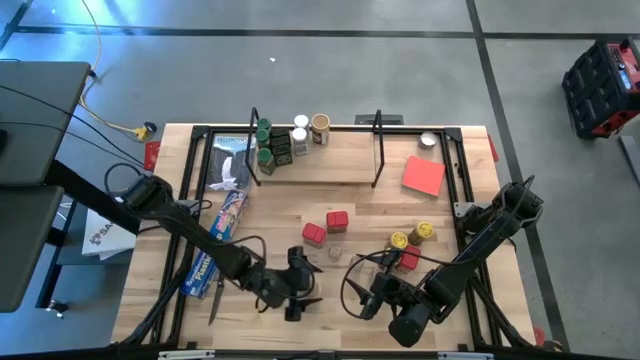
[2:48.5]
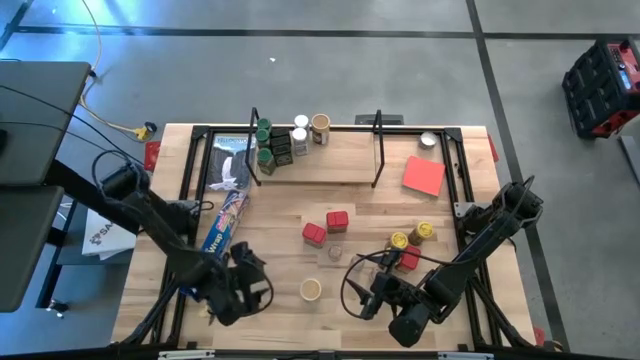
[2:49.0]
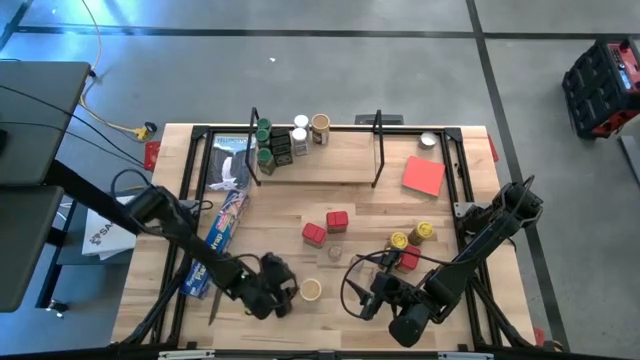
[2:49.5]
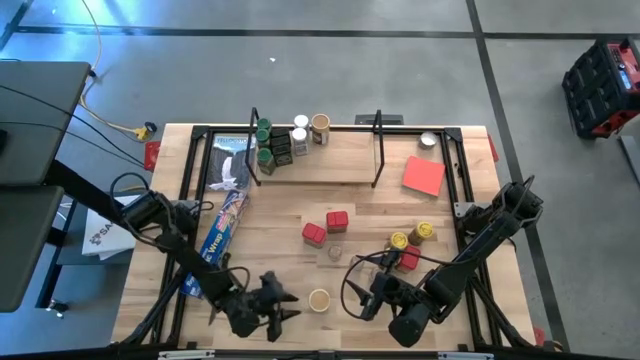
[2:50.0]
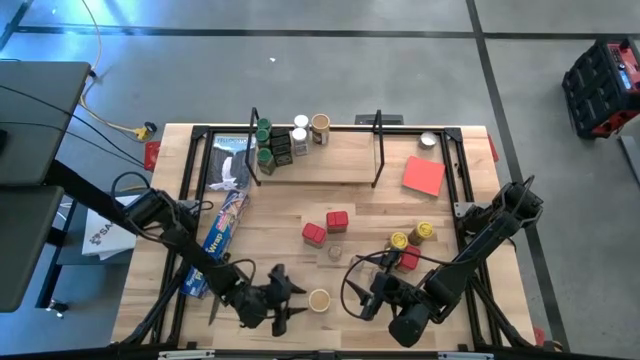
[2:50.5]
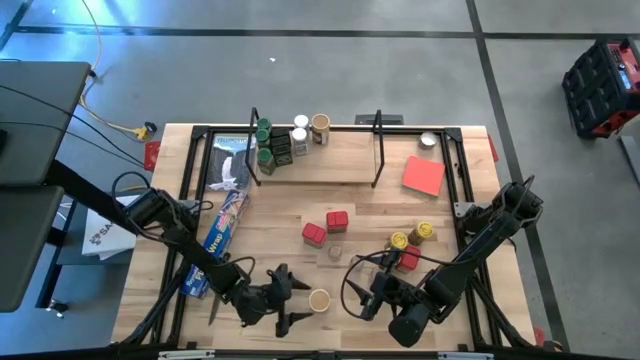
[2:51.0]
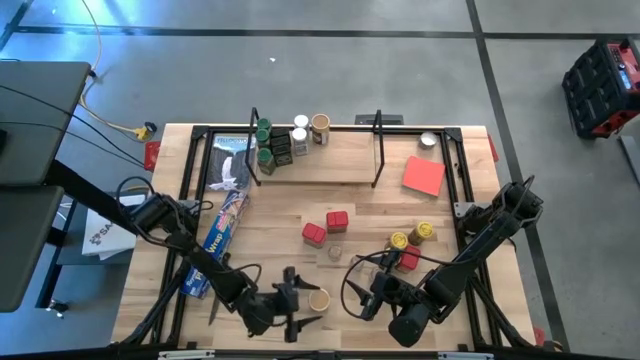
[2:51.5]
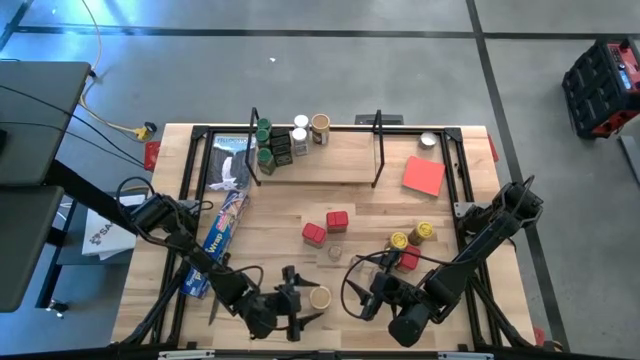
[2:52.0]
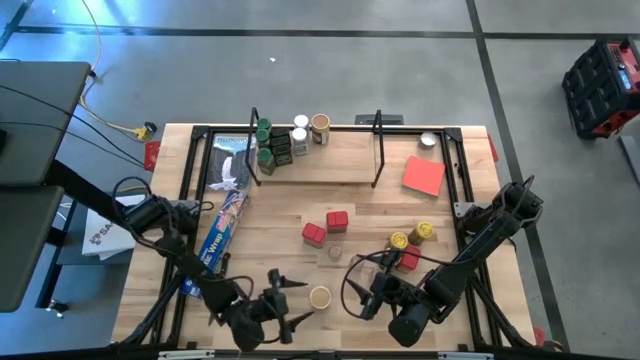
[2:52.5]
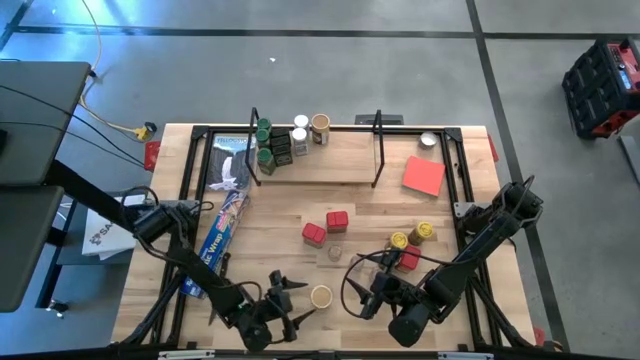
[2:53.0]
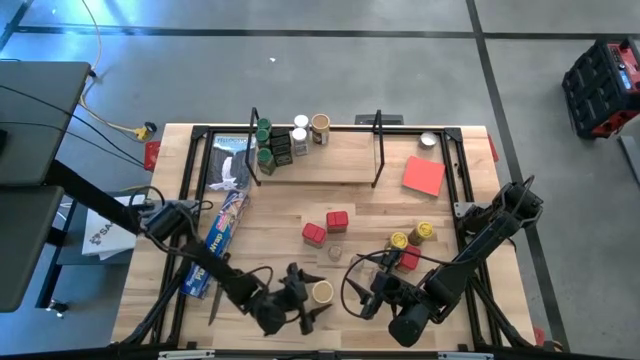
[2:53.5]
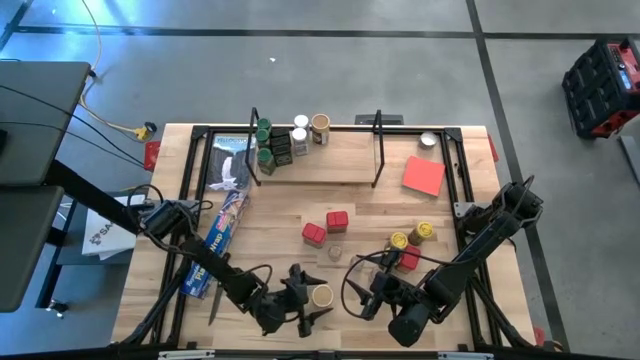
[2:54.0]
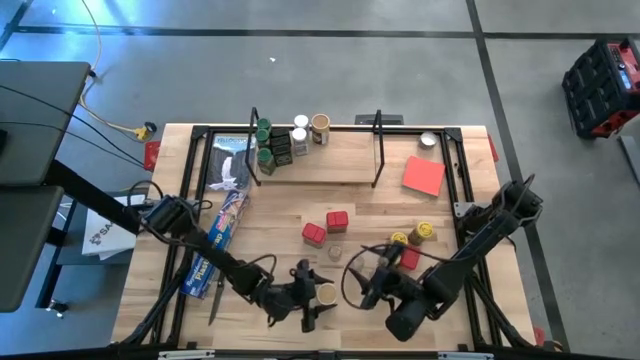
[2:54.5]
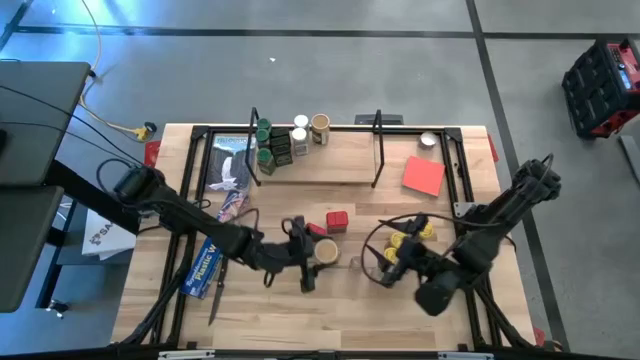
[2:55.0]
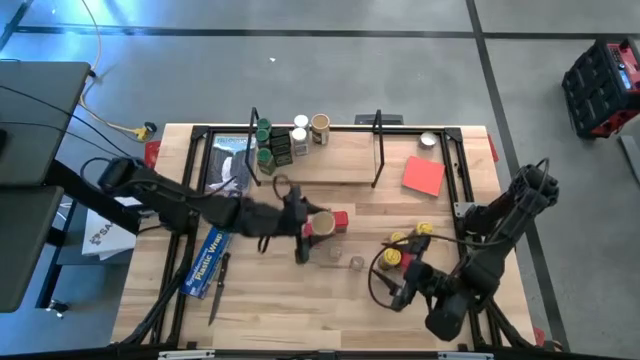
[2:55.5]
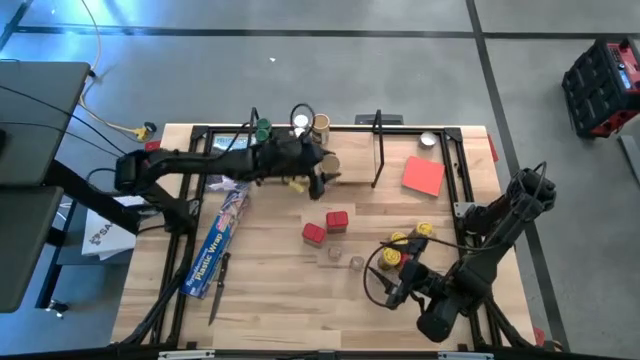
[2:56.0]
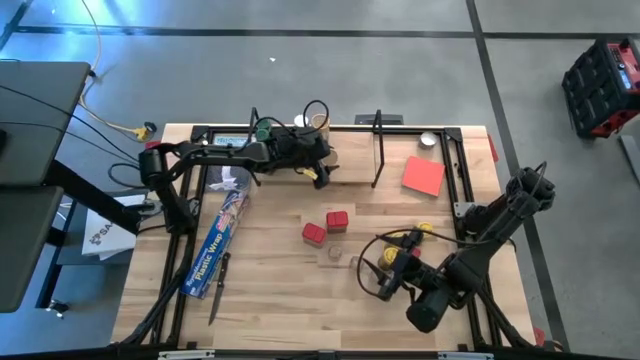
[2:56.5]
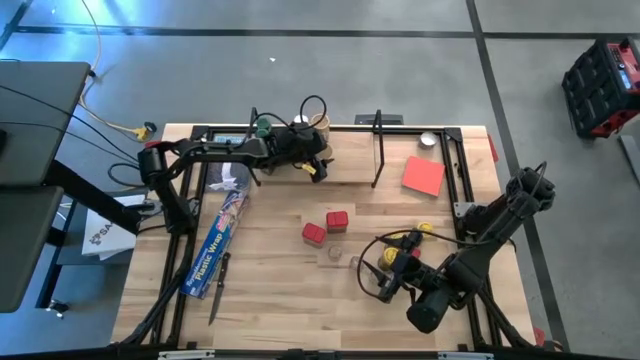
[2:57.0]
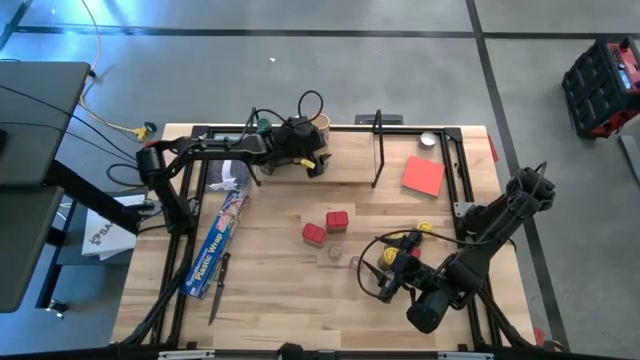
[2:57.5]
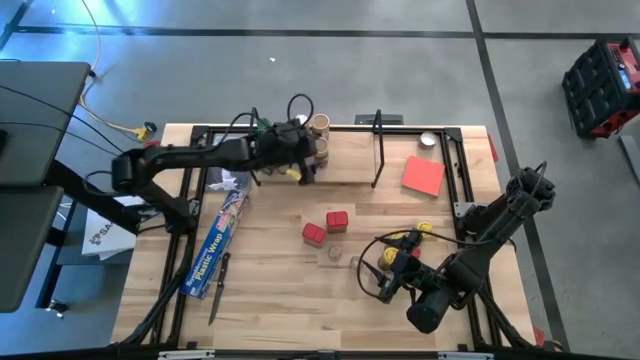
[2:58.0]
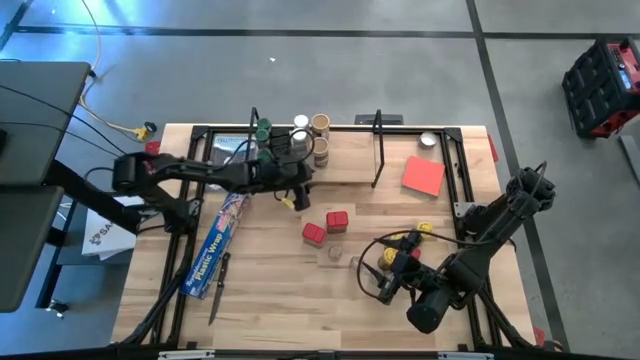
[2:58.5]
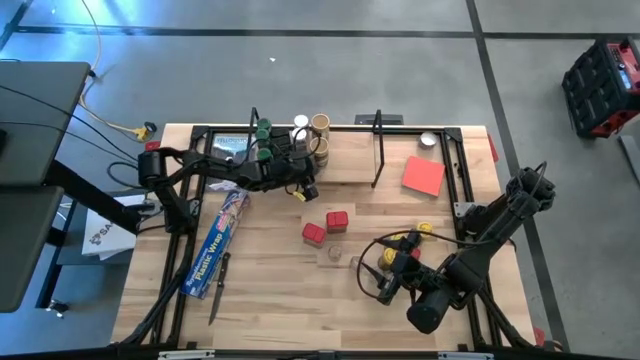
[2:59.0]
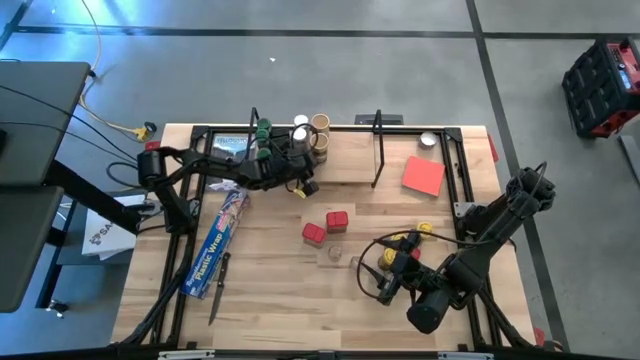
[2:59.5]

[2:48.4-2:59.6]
Task: Shelf spices
Put the gold seasoning bottle on the shelf and align it with the other gold seasoning bottle

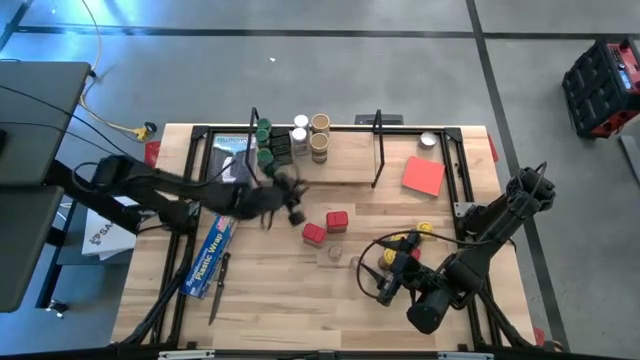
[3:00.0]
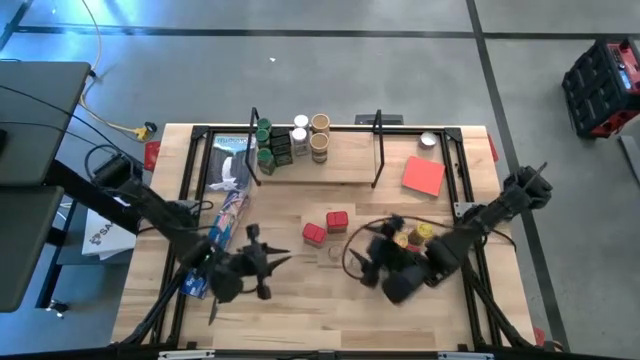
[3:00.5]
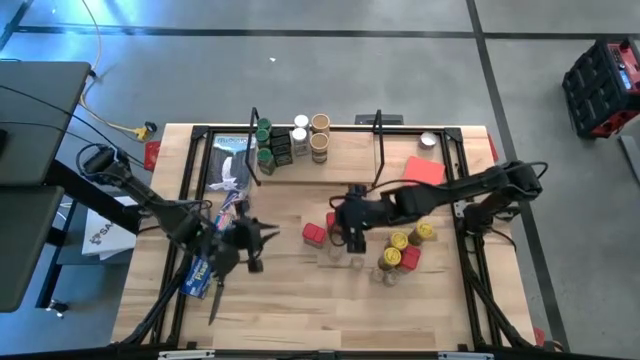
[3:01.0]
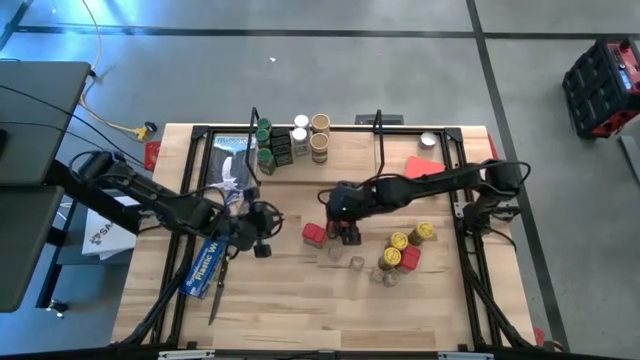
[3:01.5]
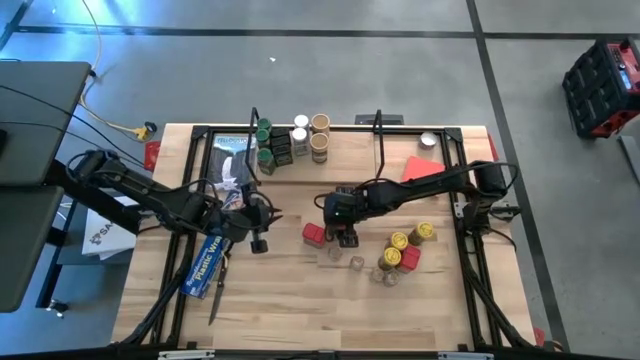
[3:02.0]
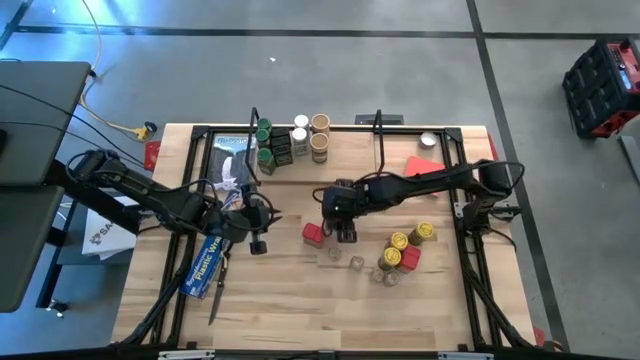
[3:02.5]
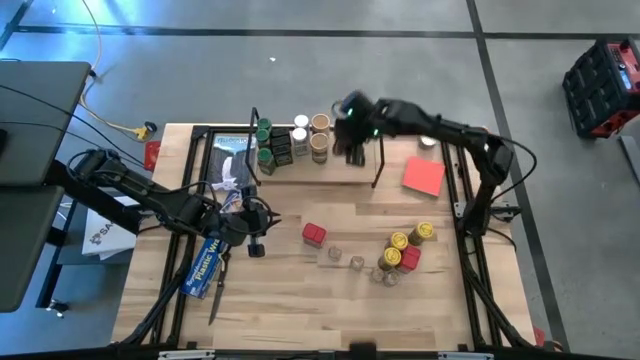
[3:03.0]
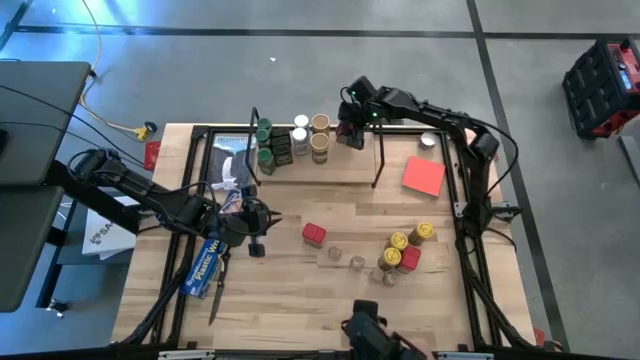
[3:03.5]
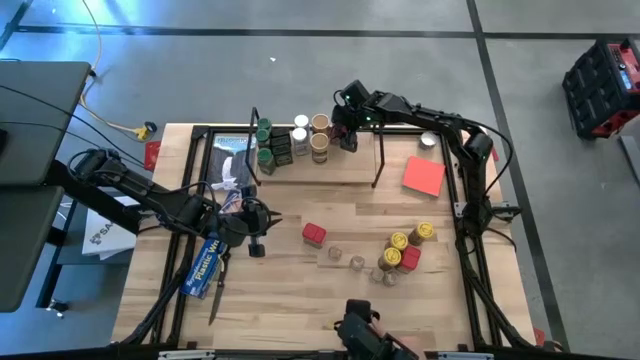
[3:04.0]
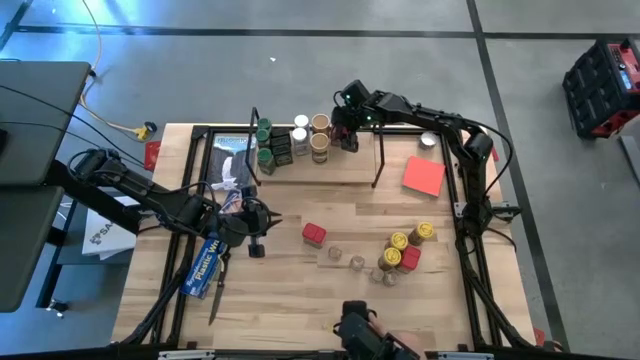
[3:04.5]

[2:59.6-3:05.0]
Put the red seasoning can on the shelf to the top right of the gold seasoning bottle

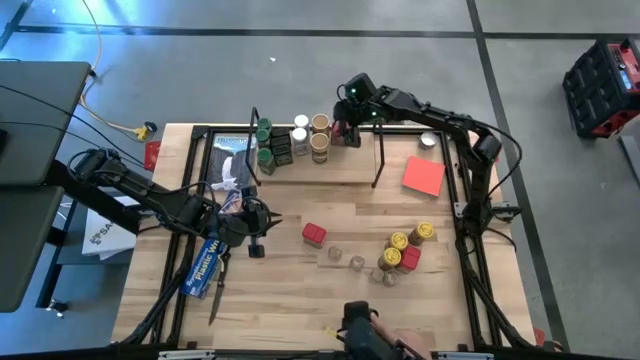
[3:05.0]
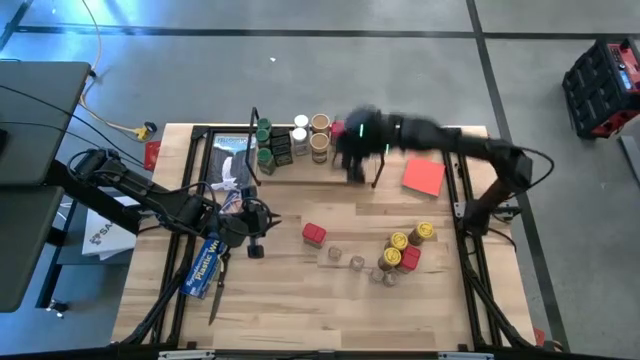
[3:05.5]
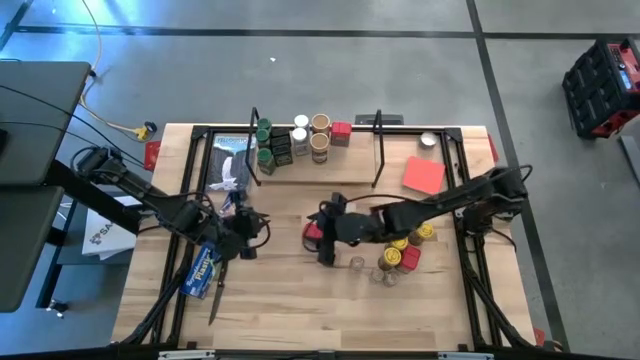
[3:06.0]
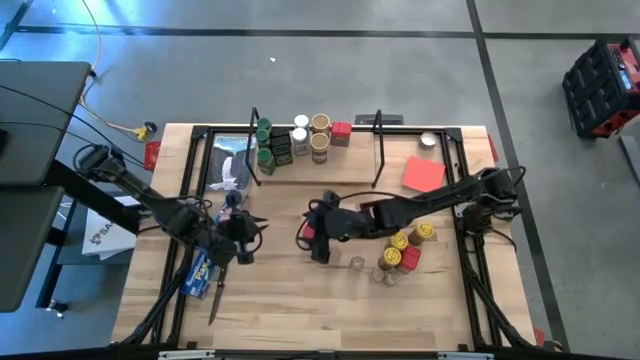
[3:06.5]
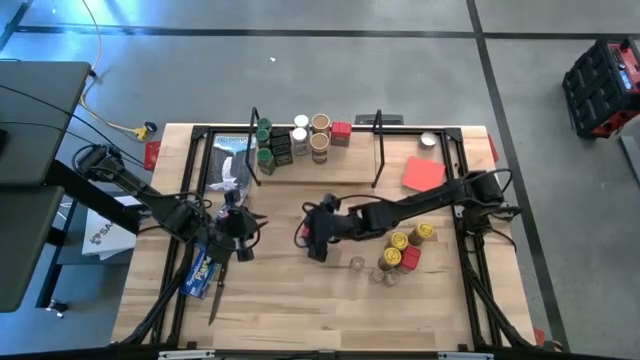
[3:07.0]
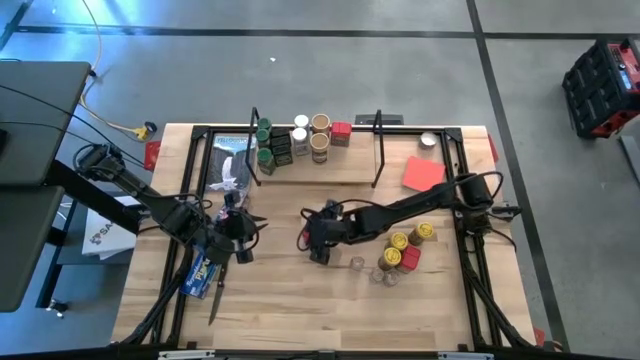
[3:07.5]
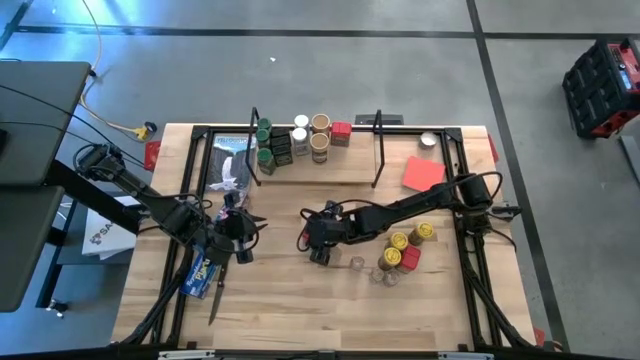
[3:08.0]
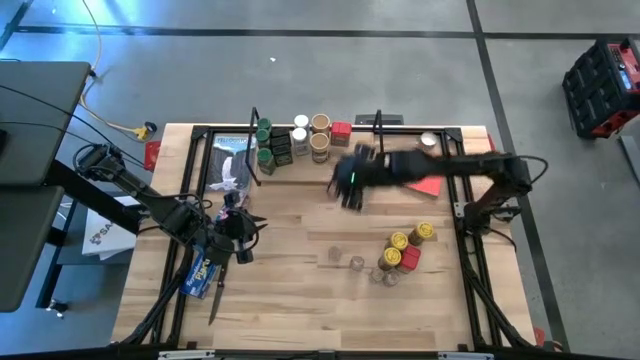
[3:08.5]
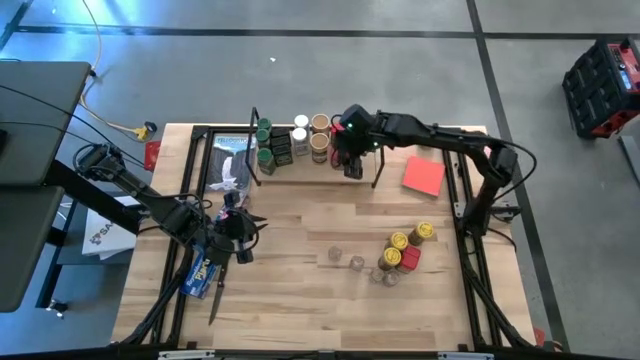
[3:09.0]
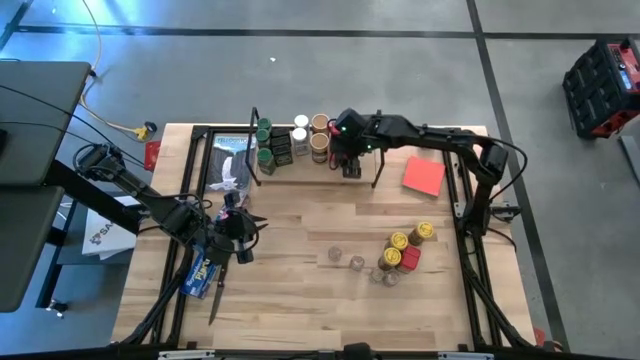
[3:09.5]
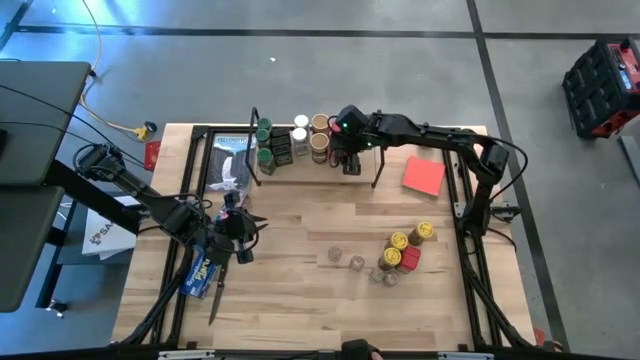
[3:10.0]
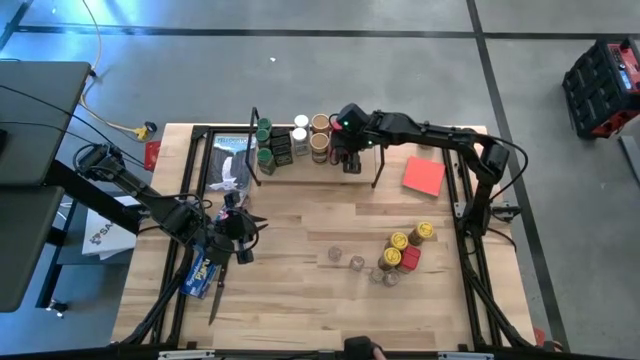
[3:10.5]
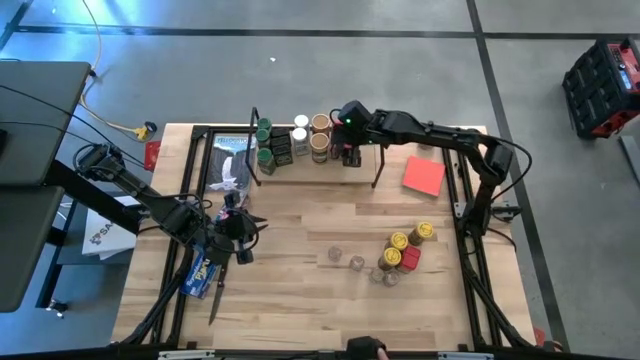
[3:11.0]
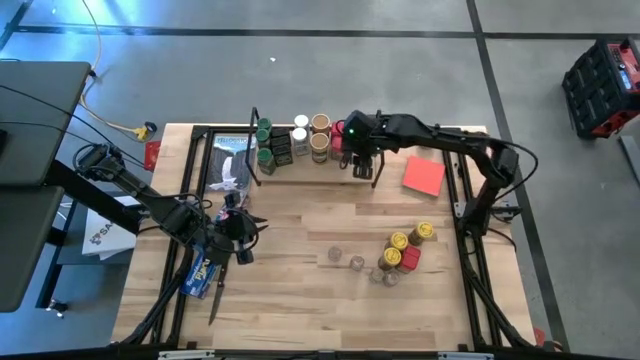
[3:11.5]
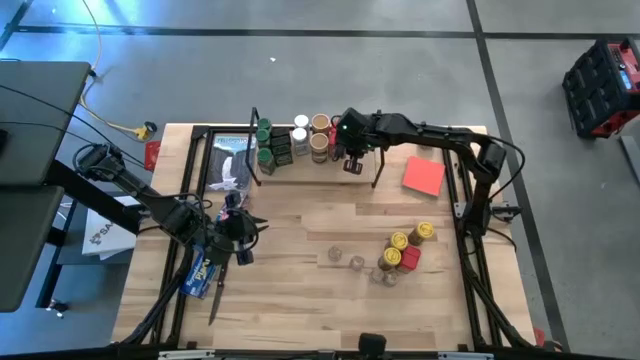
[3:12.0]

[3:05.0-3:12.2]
Put the red seasoning can on the shelf and align it with the other red seasoning can
